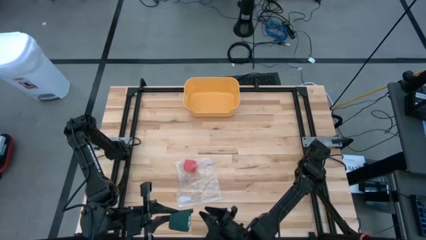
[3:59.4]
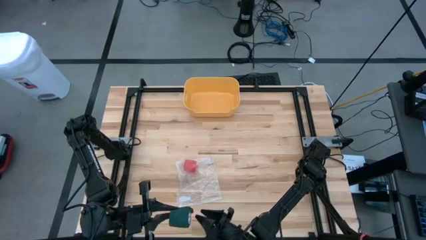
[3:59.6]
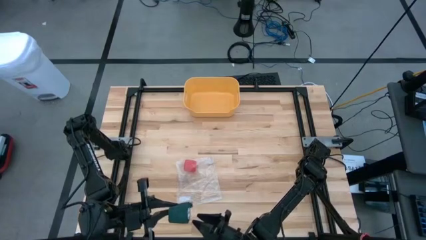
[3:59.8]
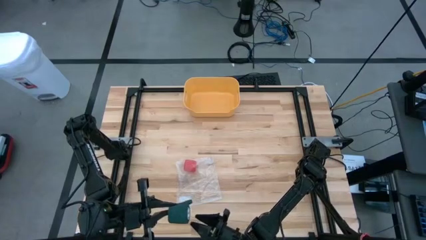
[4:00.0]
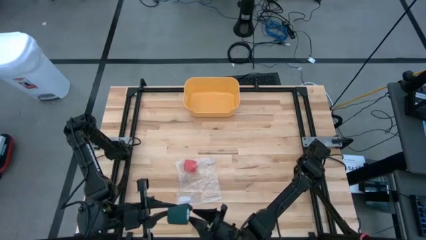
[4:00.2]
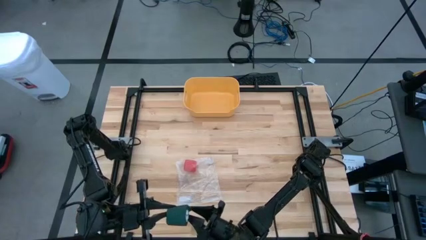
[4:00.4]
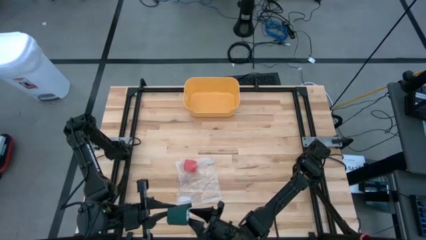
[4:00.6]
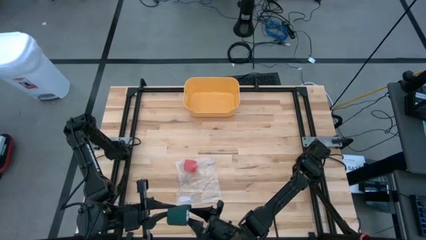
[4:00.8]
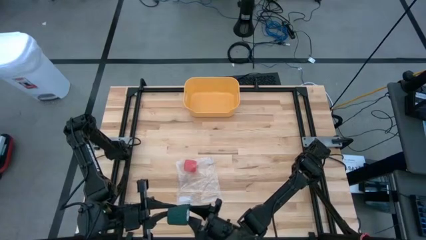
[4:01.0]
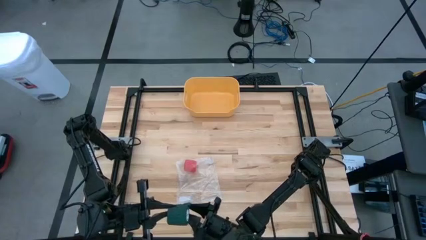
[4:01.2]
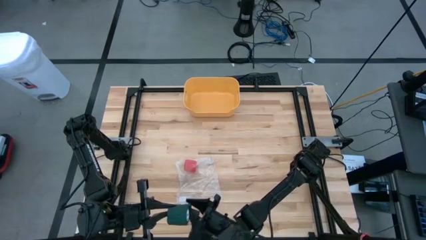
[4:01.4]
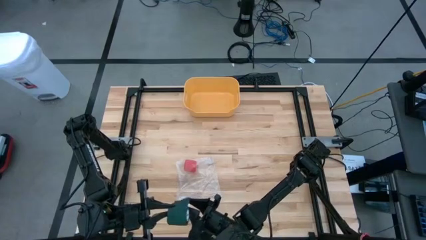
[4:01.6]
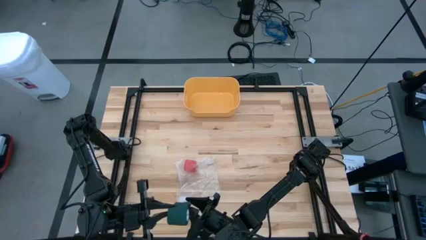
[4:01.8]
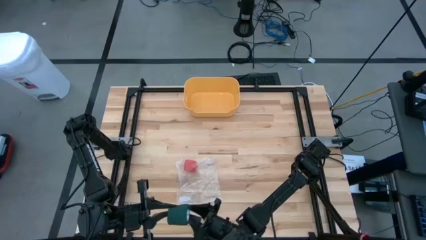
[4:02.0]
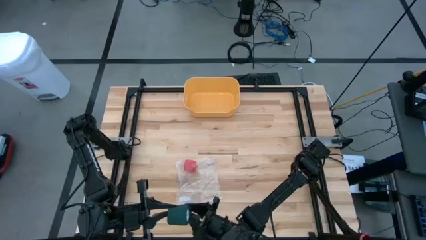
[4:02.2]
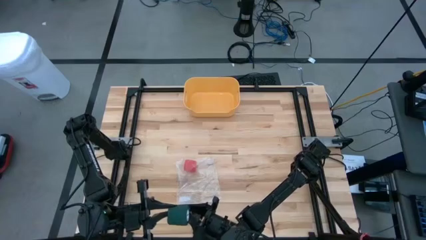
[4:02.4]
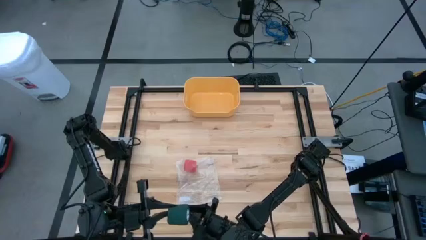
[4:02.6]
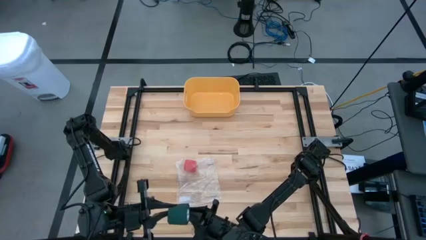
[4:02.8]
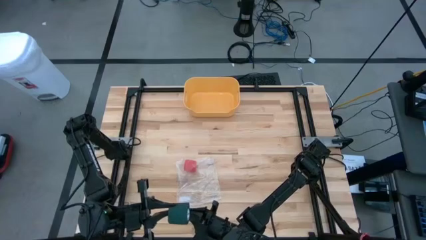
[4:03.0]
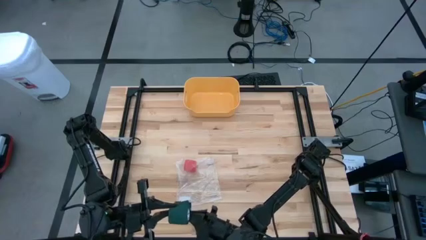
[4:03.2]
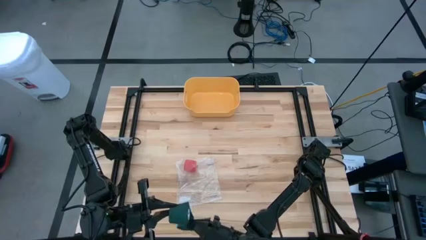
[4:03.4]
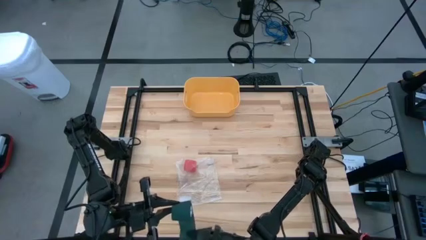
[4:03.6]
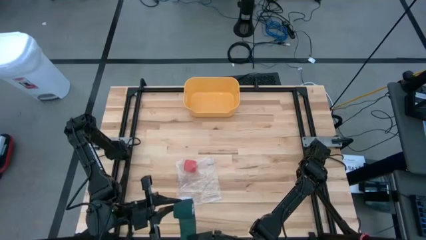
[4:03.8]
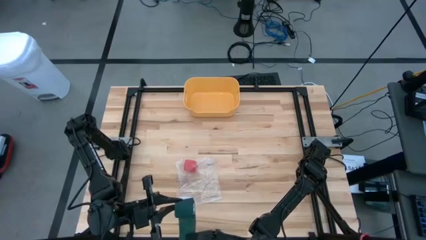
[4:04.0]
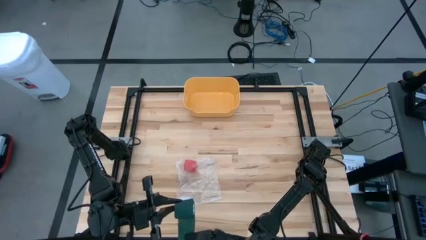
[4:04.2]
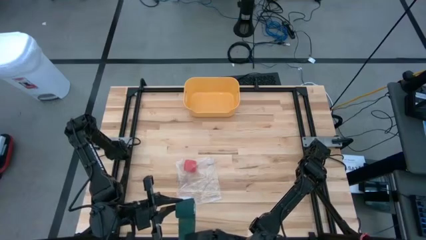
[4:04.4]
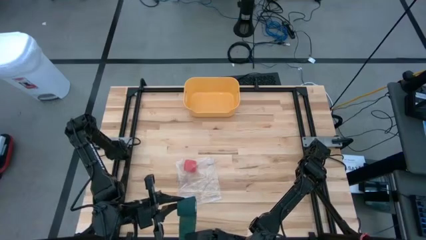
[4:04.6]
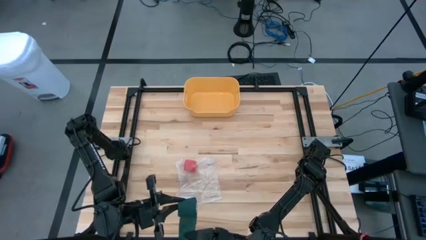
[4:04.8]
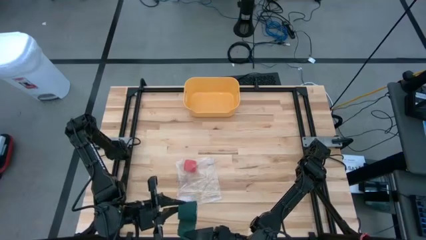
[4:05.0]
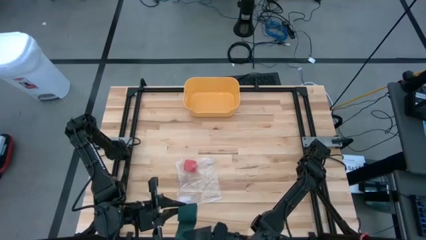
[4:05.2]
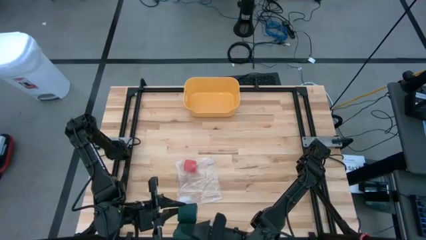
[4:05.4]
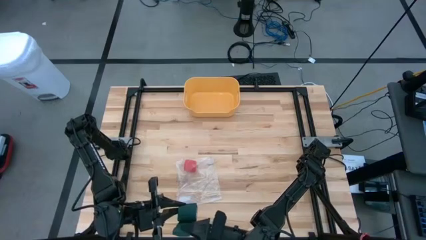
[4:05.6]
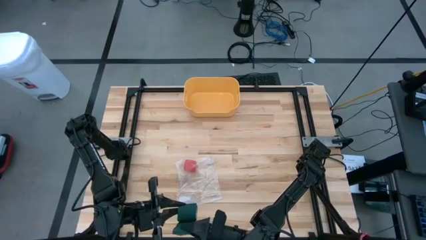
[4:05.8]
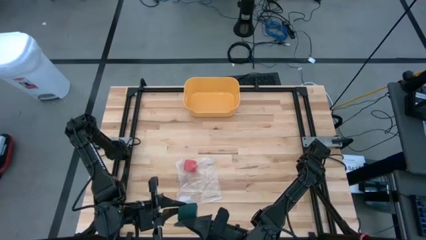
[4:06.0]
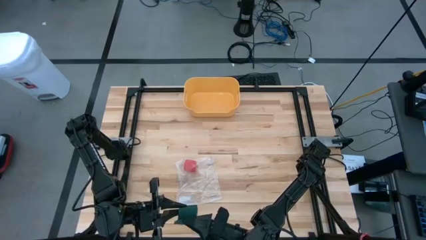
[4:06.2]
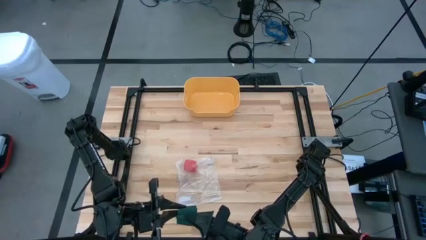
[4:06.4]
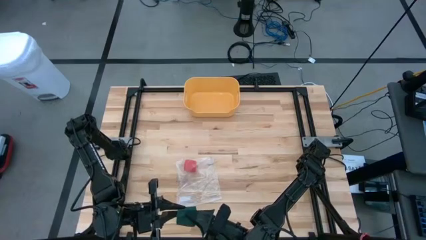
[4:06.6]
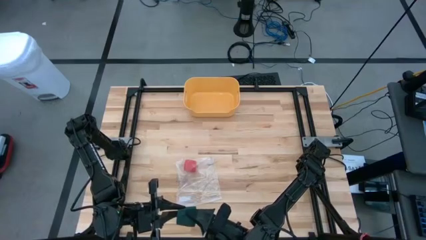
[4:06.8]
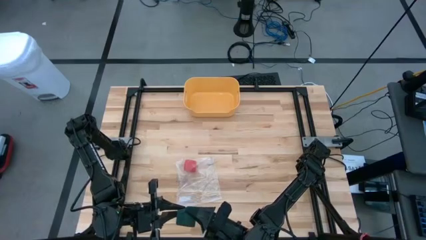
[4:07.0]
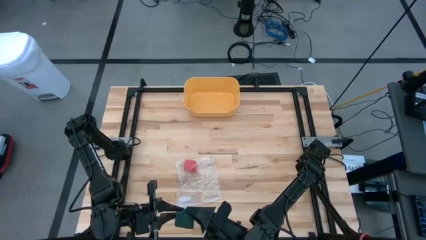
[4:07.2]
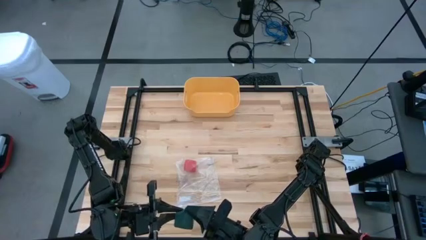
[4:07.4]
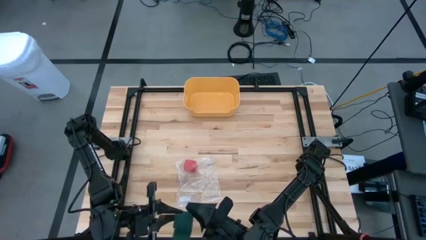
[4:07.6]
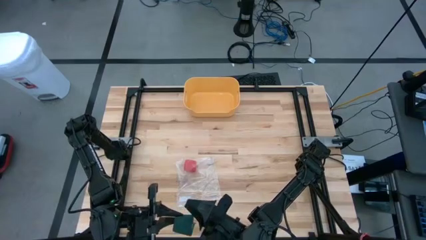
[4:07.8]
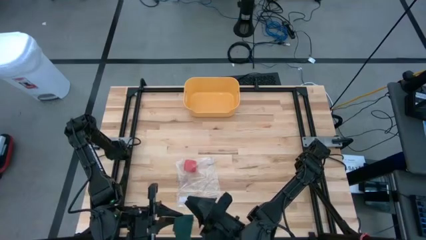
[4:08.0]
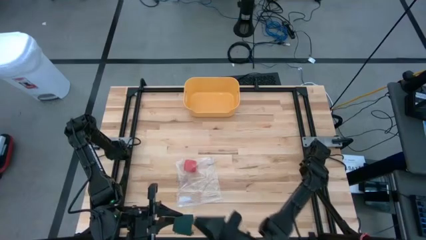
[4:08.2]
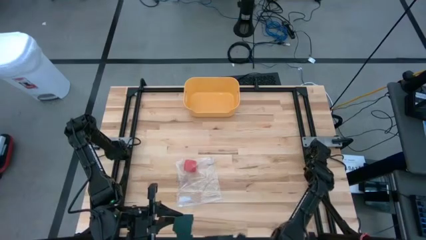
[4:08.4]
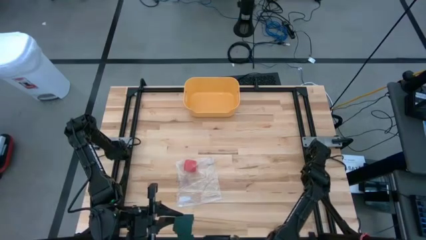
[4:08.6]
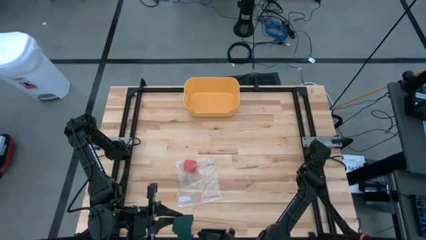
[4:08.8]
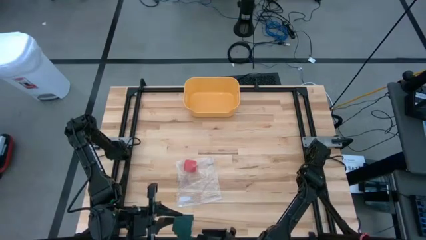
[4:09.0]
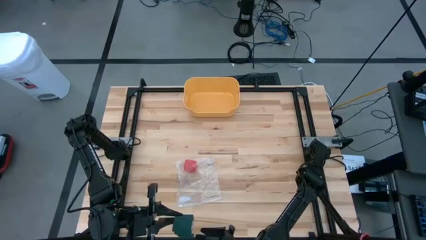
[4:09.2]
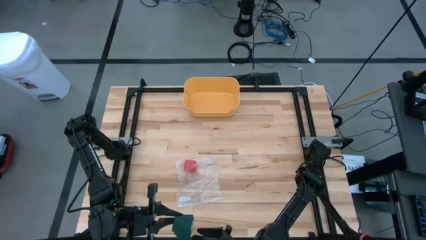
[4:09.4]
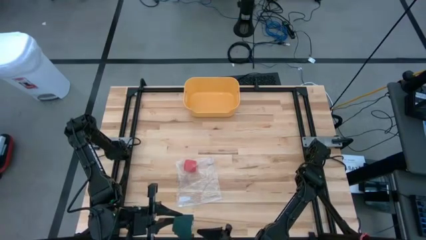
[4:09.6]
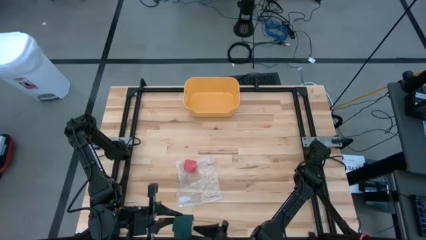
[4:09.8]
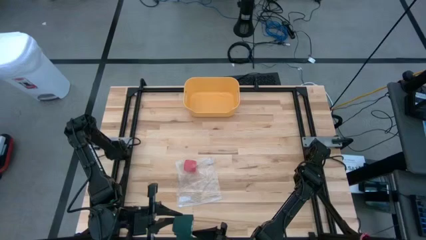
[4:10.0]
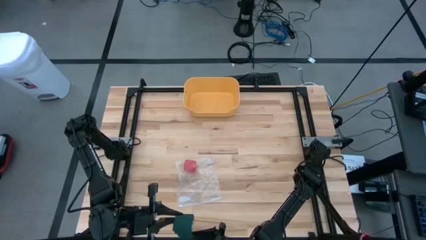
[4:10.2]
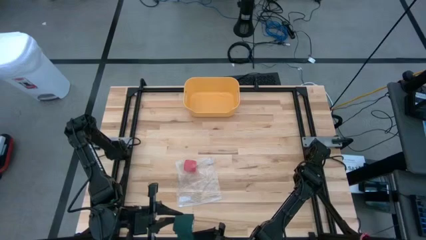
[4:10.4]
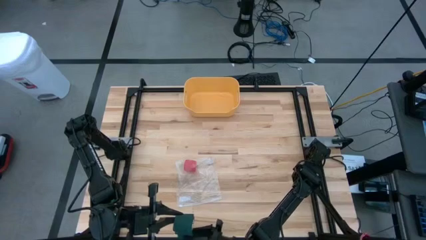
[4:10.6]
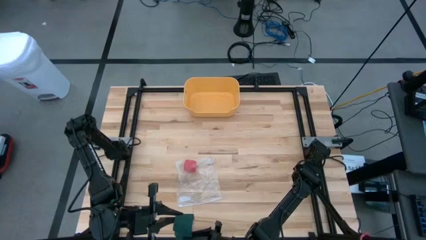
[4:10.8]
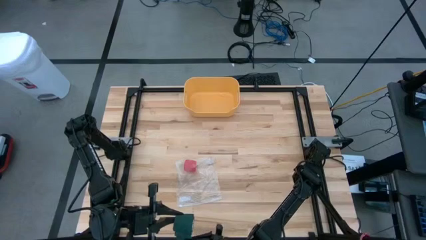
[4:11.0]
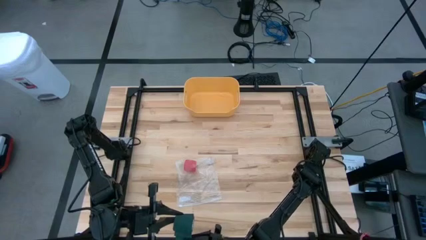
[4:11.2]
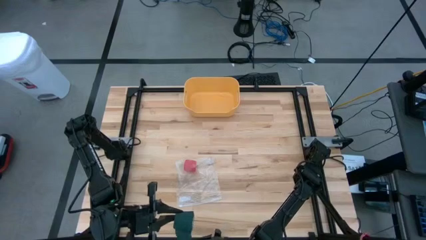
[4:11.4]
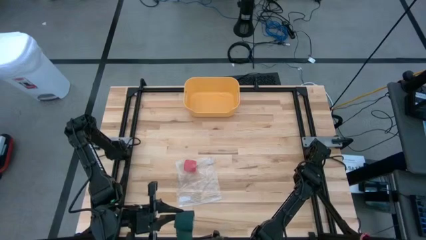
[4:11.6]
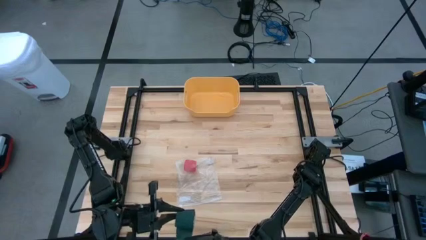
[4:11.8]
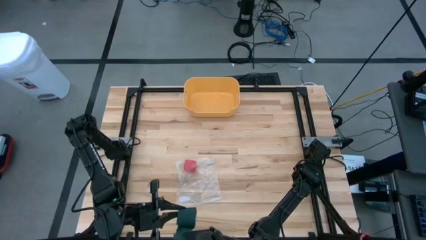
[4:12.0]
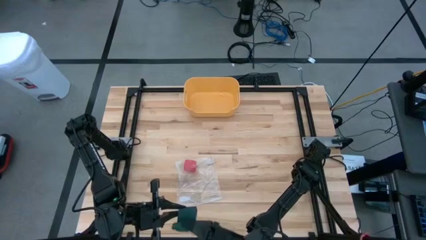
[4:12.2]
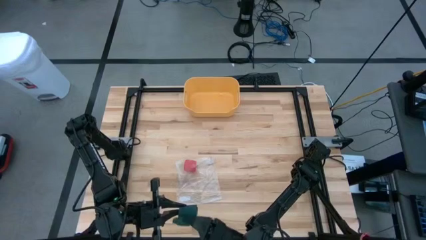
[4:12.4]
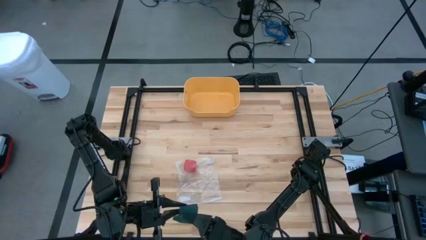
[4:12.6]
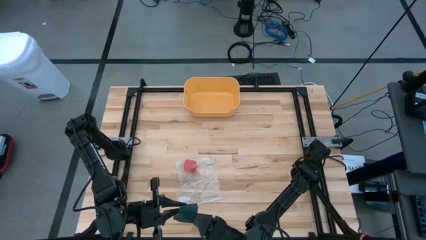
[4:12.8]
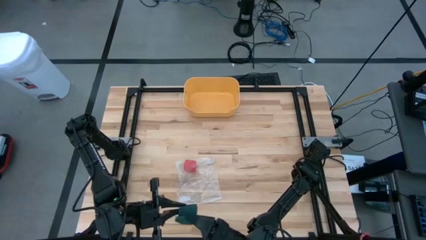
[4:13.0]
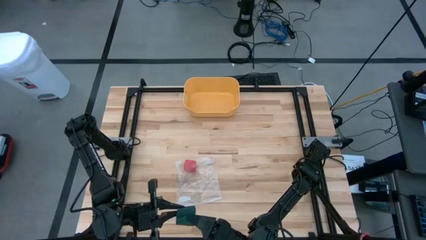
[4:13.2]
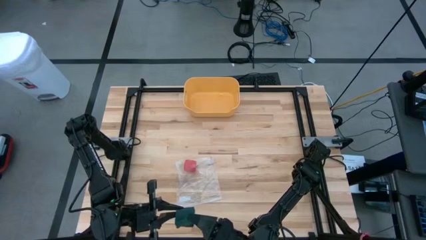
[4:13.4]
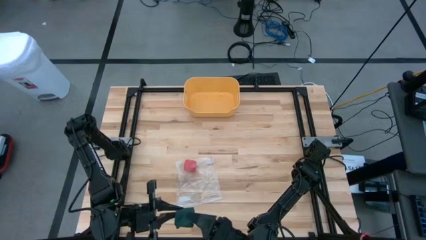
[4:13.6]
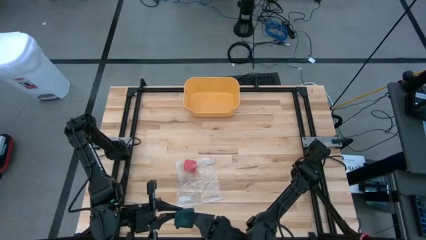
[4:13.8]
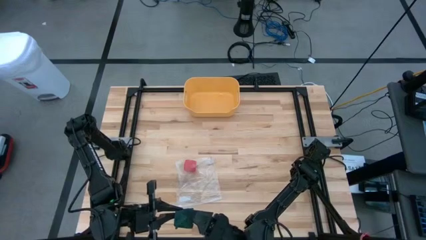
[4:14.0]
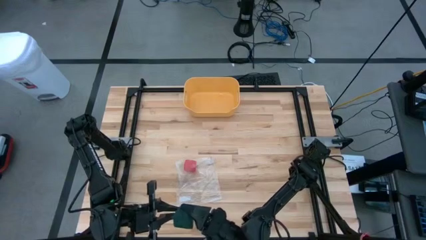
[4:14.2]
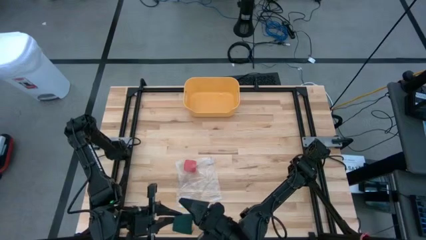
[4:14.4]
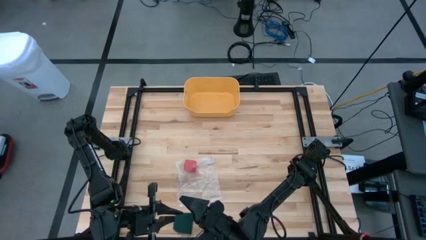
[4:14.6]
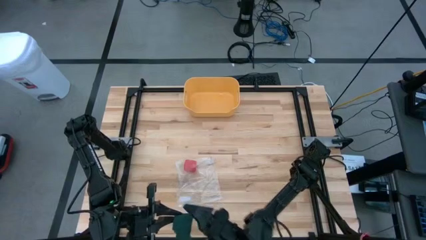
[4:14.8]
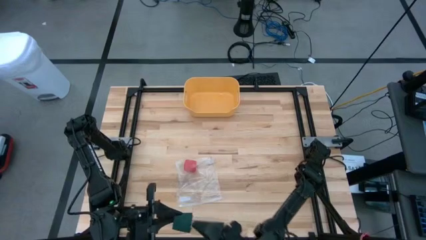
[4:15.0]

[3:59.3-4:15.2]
Task: Roll bandage
Roll the green bandage
